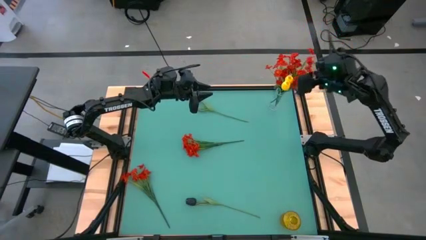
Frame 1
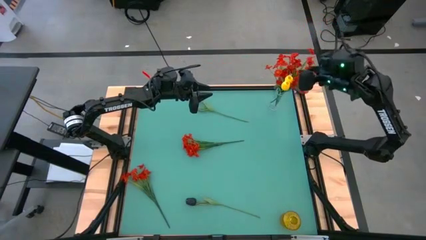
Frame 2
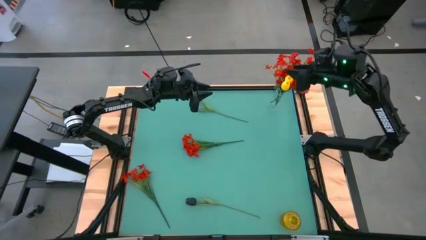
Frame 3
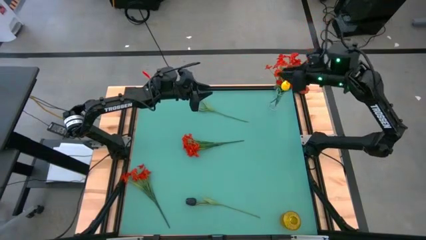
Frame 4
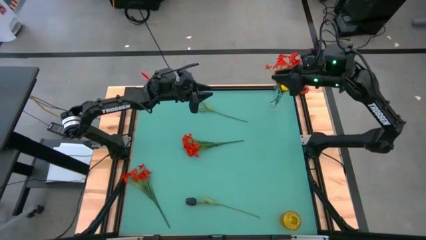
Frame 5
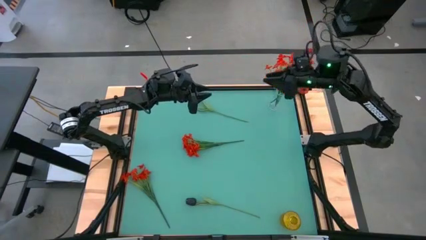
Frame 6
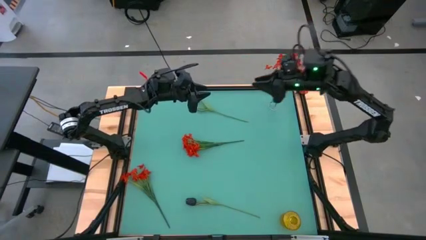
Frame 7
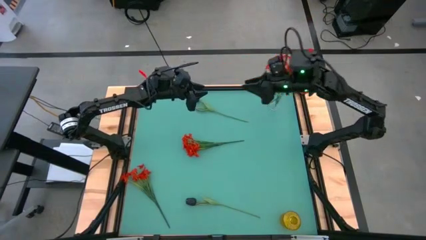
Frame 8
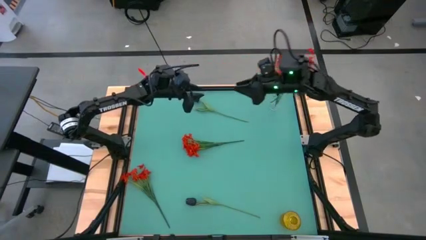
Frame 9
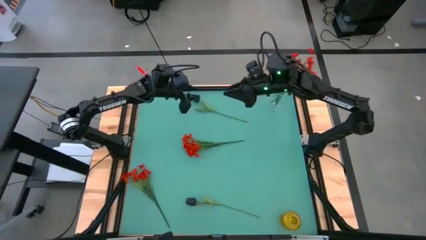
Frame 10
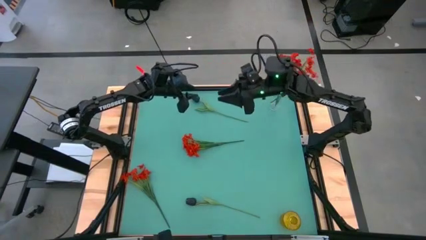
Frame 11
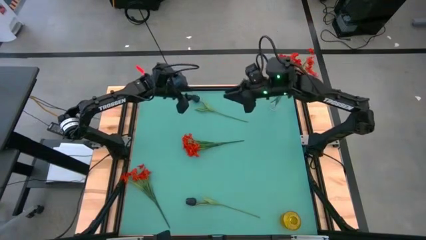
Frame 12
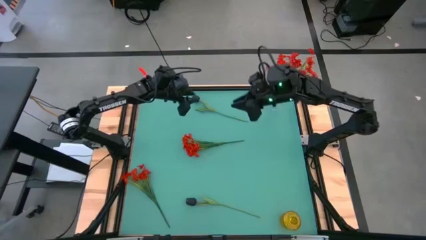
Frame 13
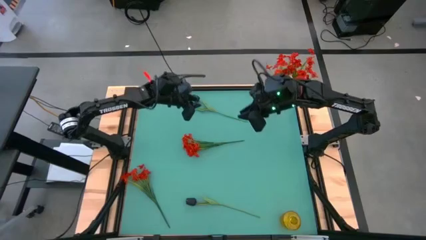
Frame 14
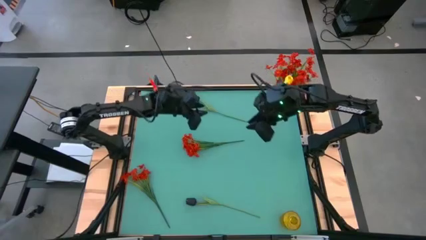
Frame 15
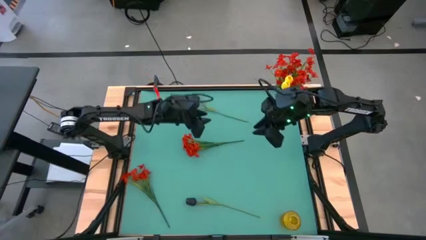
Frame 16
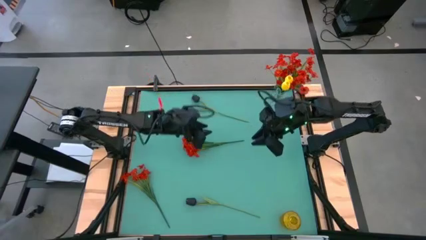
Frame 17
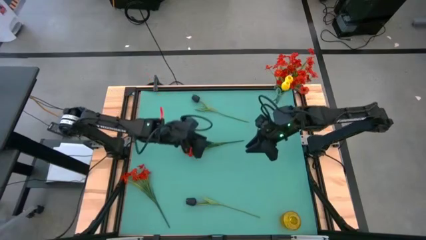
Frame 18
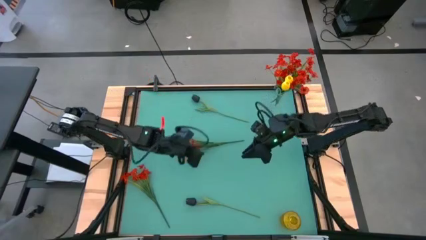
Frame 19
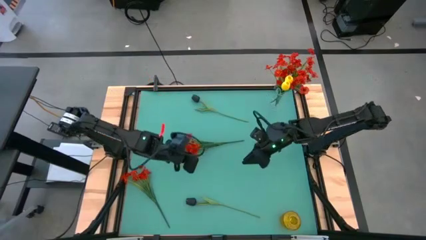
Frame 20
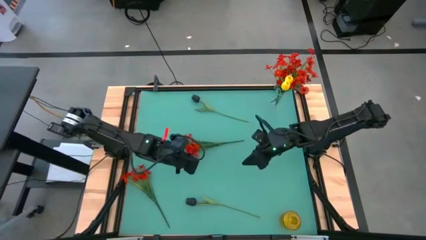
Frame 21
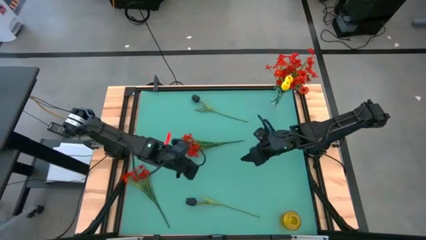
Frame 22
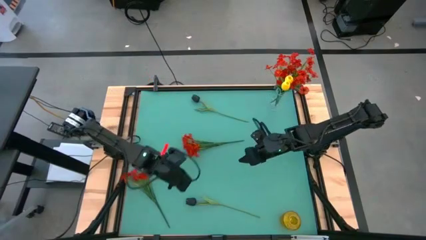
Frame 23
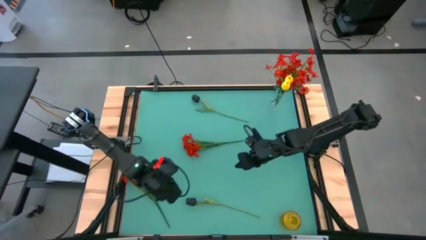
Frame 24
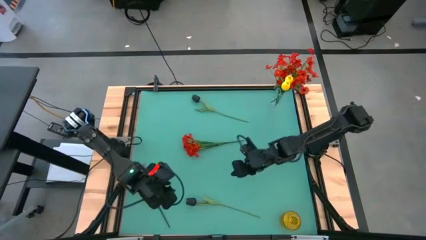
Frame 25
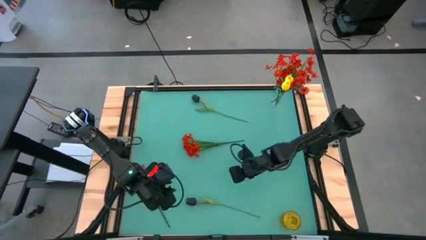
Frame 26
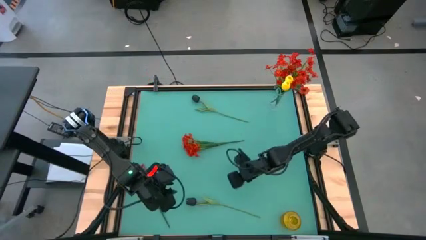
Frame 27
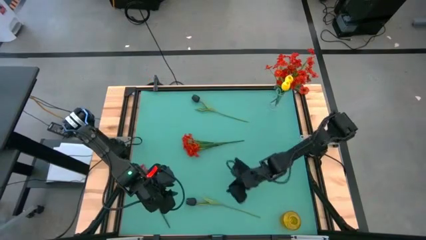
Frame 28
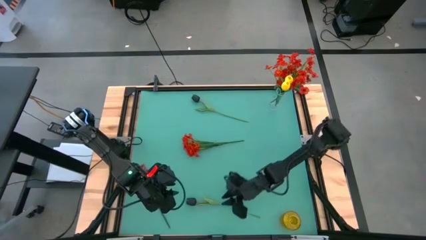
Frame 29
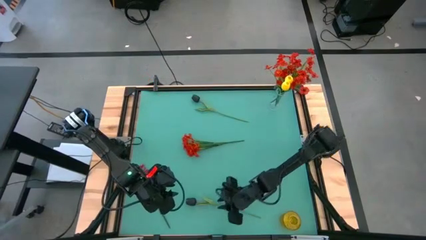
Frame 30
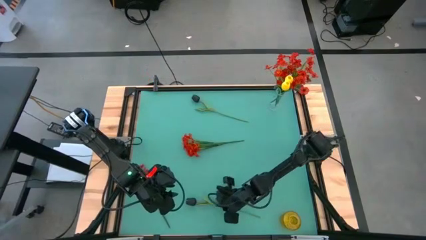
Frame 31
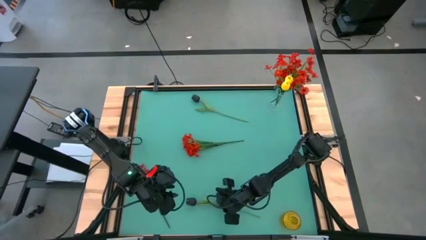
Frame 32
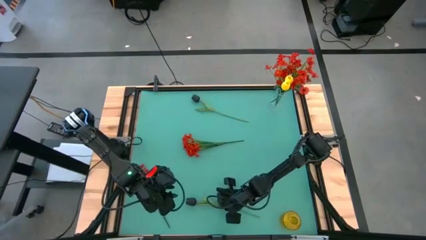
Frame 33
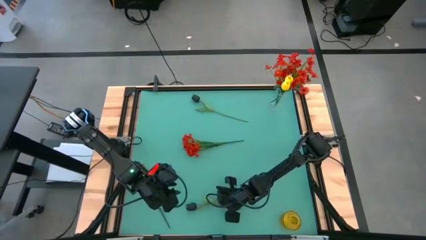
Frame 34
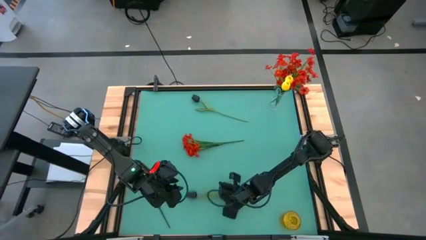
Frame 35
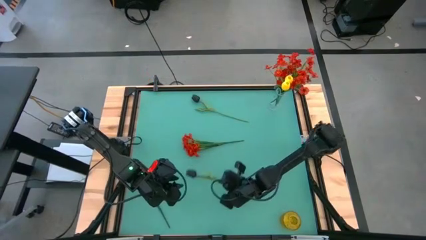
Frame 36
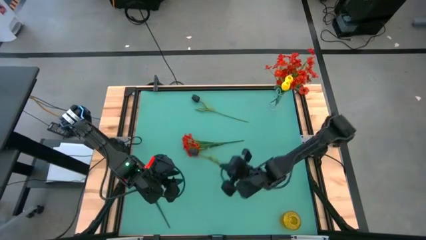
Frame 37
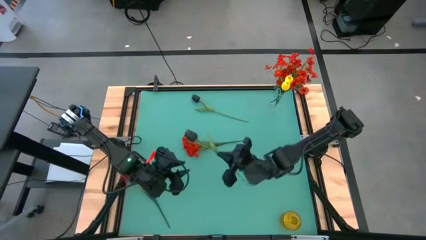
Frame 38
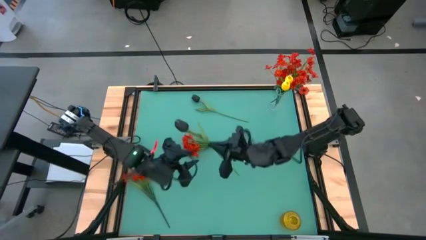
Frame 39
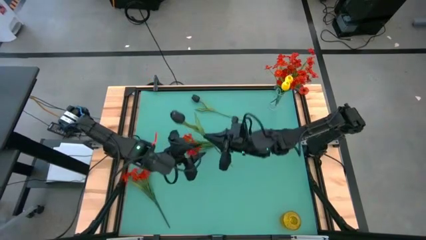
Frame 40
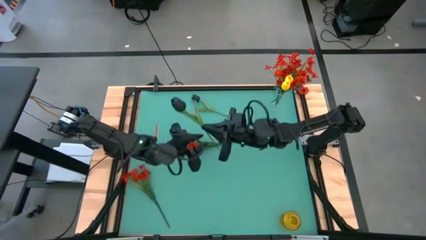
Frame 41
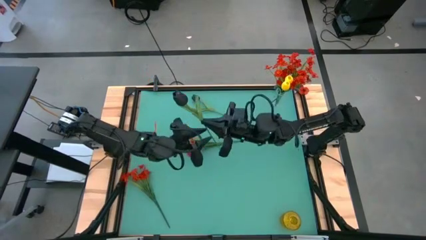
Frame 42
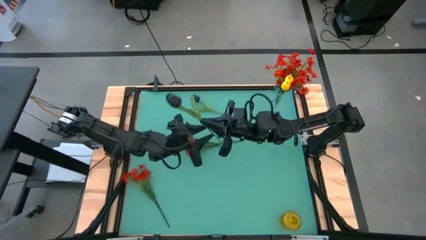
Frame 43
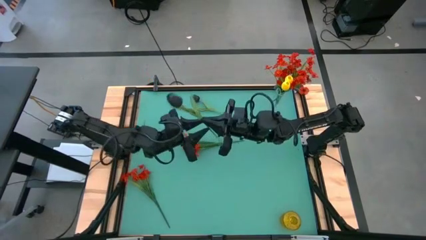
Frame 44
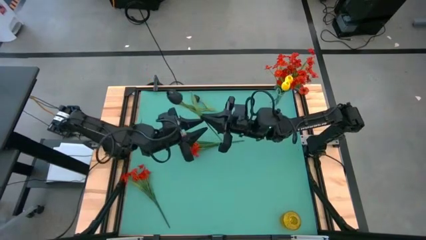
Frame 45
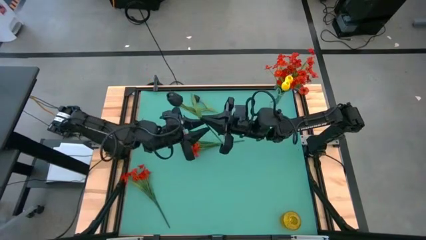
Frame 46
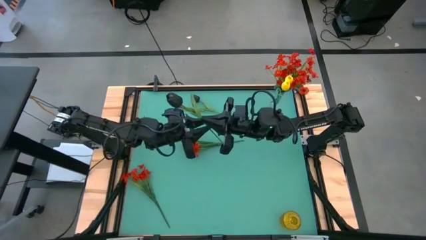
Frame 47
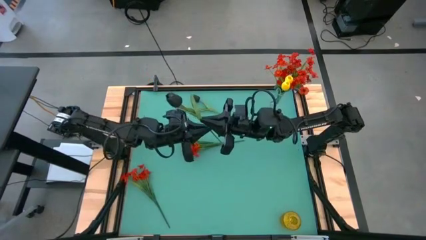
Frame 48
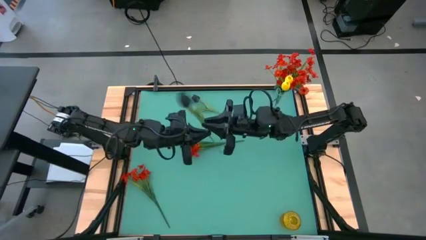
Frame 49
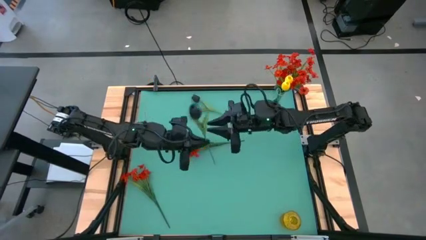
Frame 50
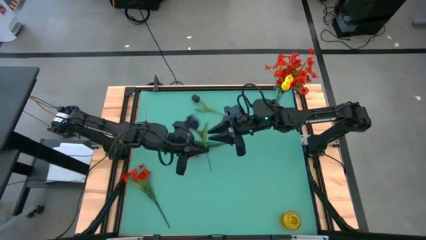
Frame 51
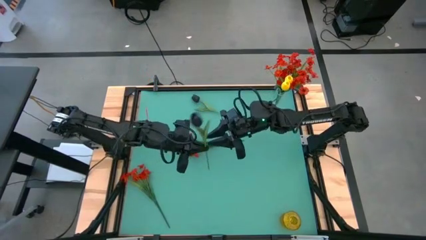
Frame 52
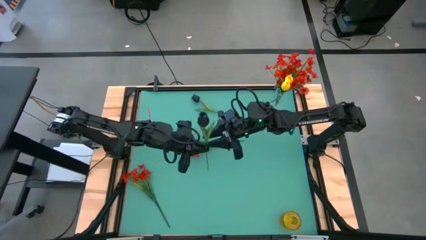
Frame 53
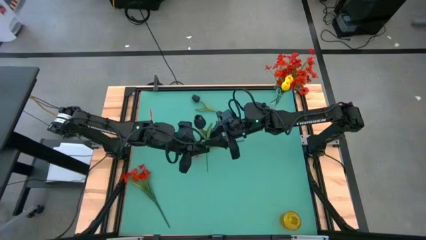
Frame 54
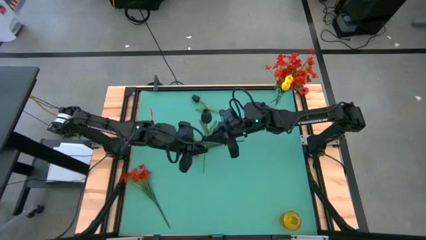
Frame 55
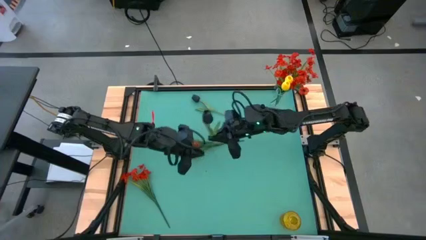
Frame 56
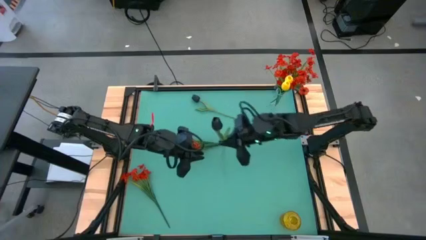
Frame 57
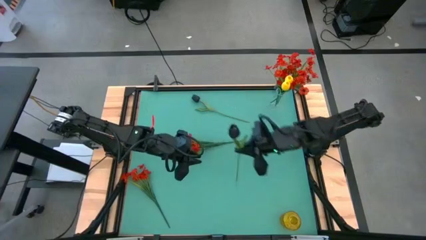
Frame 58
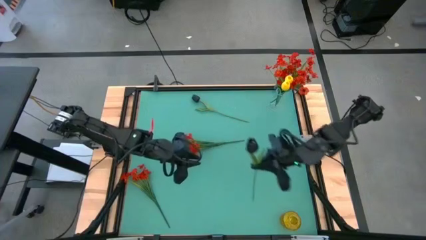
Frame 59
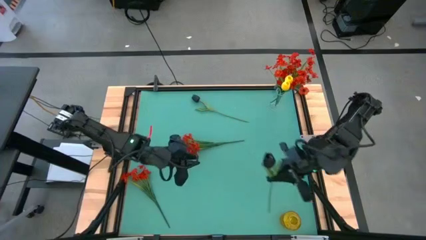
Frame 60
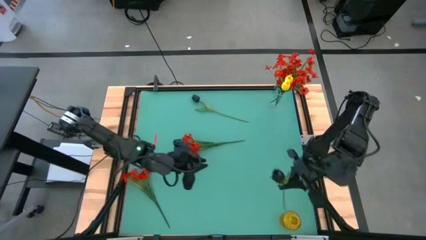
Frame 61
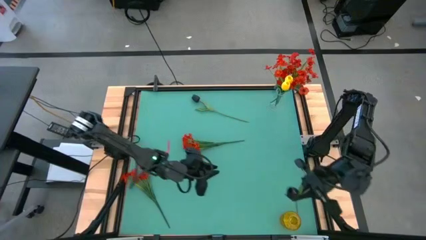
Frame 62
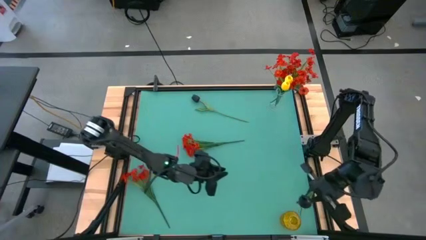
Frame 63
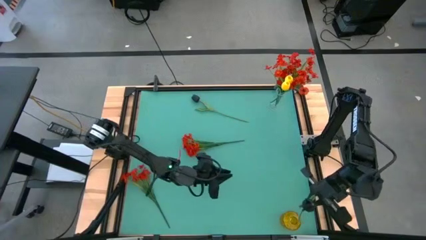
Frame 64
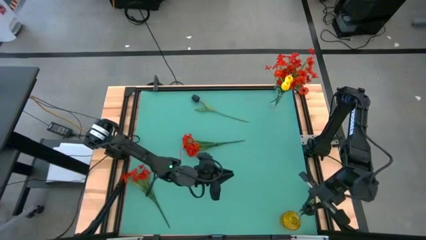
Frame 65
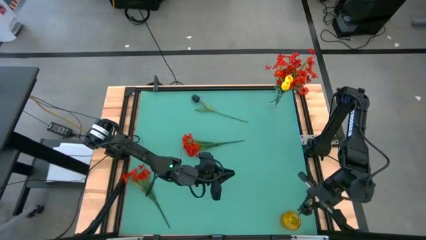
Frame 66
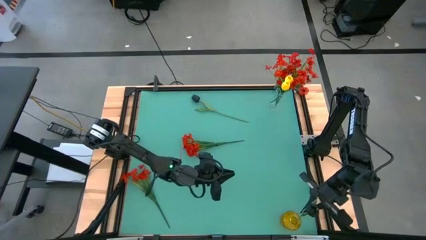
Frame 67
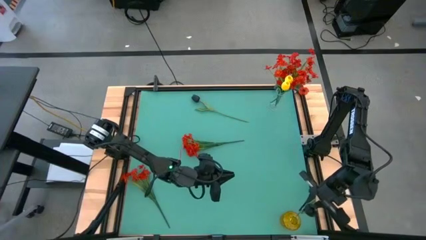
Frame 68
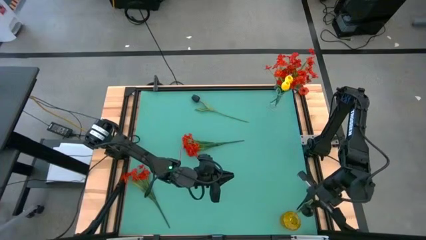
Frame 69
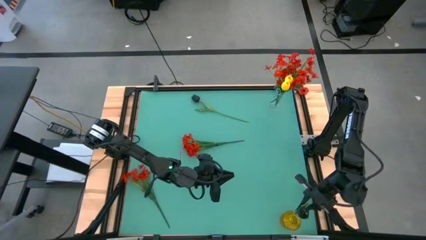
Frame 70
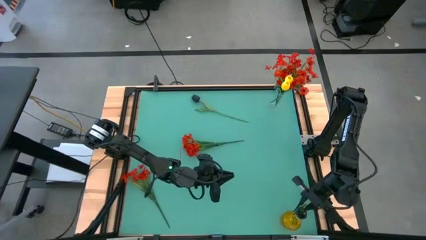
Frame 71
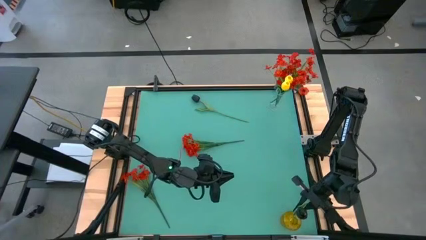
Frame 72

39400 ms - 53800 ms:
Task: Sort flowers into vase by color
Put the bottom black flower into the yellow vase
